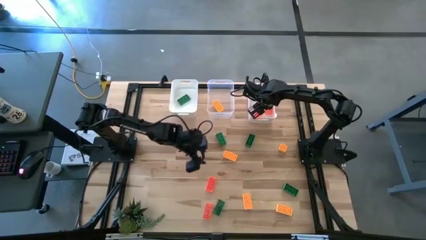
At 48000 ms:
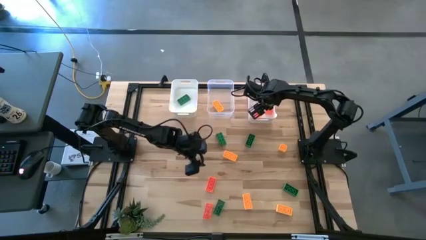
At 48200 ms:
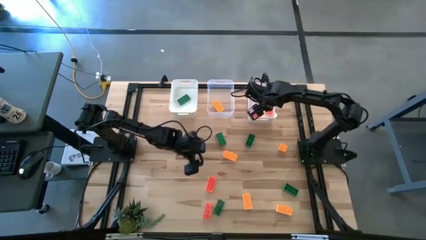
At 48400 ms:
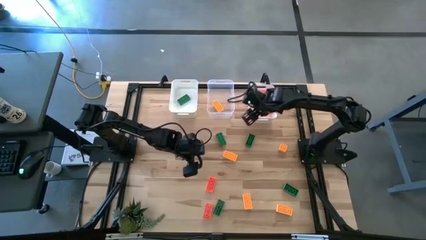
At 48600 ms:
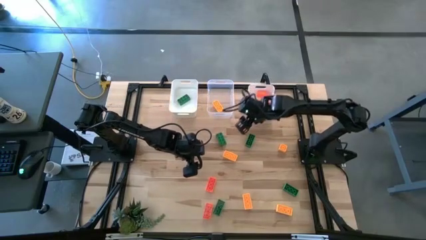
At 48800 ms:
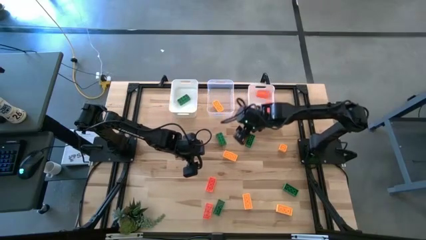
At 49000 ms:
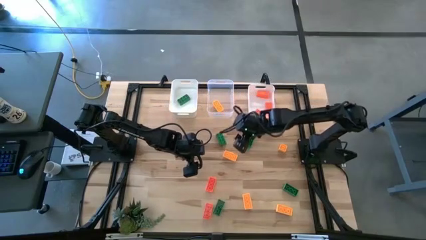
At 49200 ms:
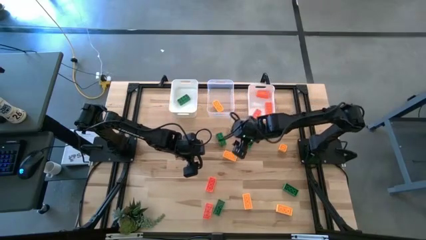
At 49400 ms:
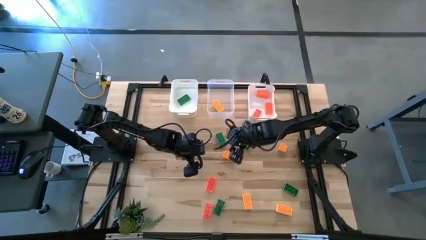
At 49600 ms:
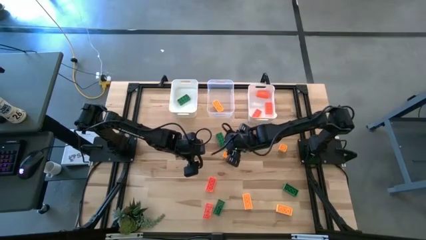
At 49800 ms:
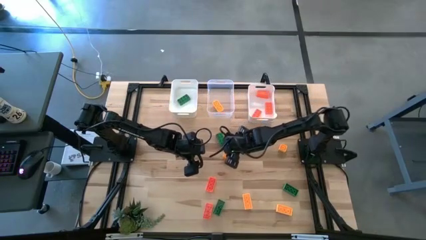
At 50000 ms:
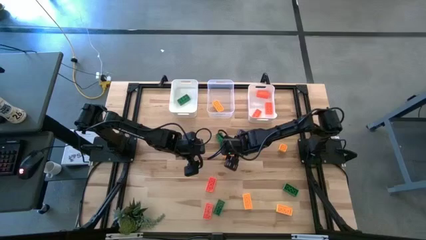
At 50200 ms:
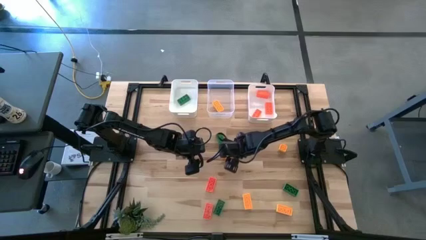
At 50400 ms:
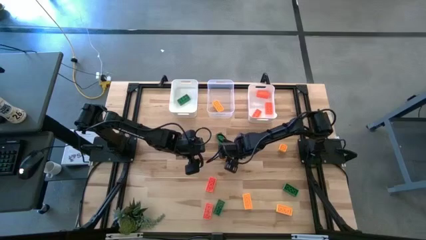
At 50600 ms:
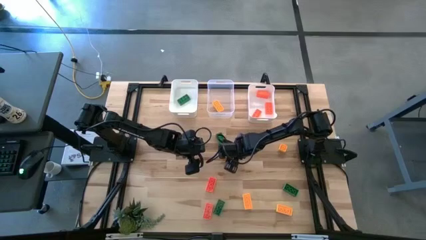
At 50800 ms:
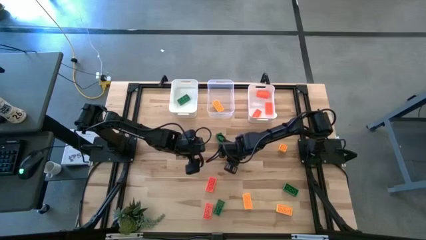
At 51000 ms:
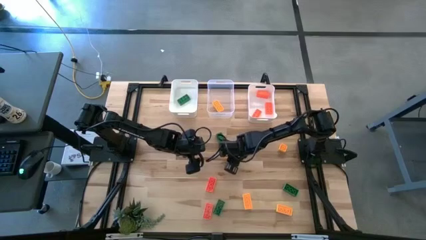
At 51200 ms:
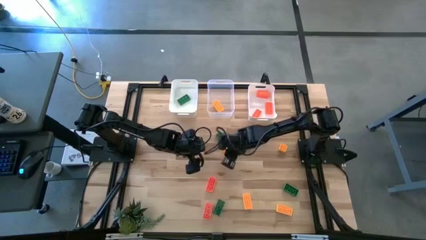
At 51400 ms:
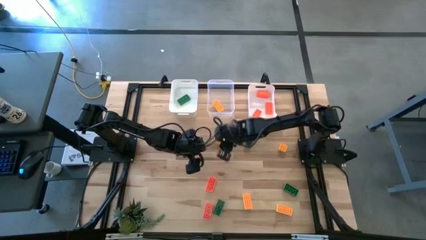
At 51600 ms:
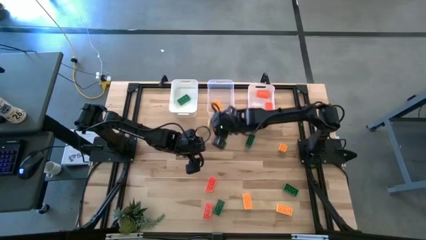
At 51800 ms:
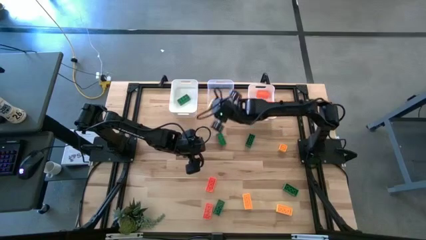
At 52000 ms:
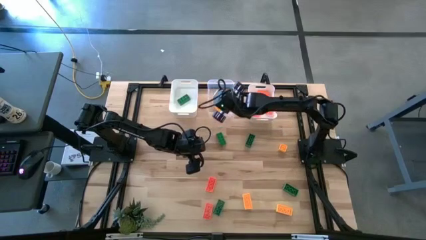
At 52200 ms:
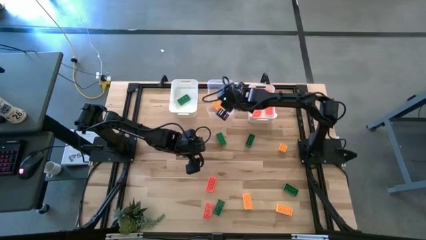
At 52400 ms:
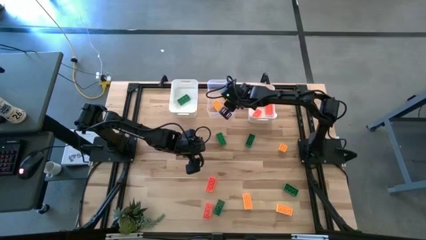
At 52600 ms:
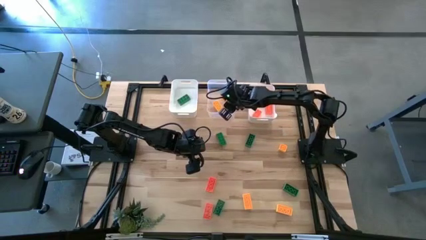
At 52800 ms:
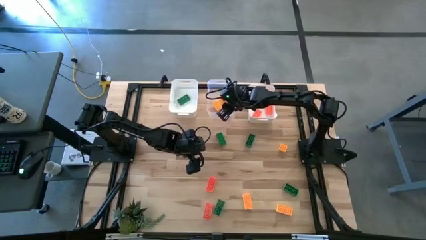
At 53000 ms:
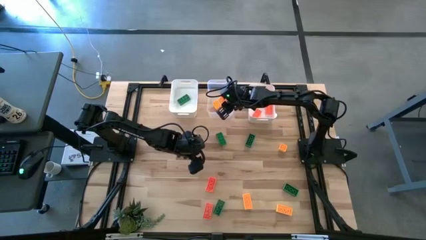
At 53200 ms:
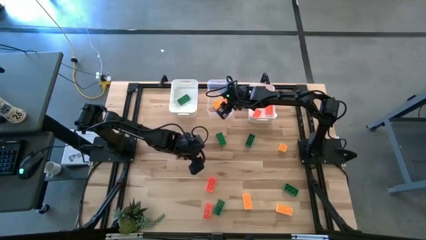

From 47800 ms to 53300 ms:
Task: Sort & place blocks by color
Put the yellow game piece into the transparent bin

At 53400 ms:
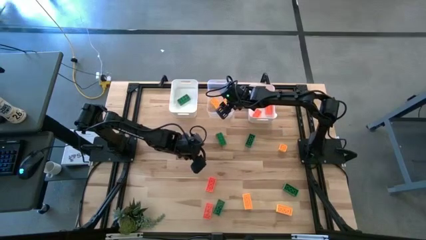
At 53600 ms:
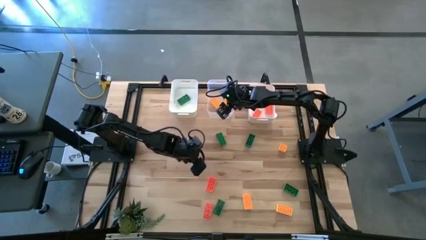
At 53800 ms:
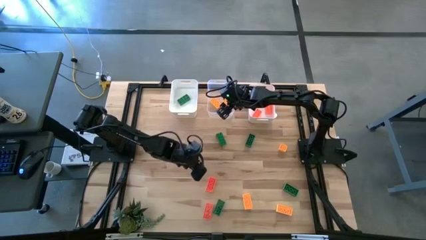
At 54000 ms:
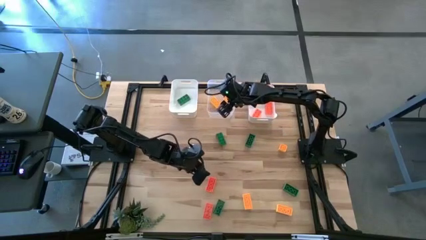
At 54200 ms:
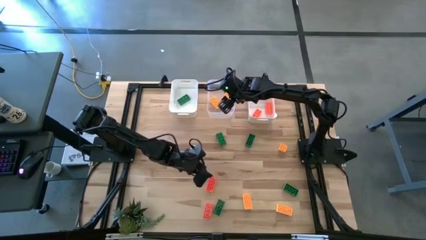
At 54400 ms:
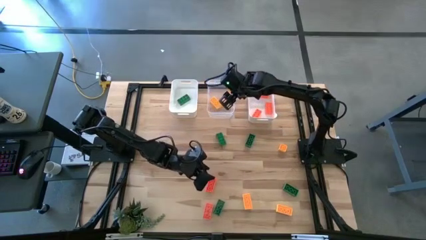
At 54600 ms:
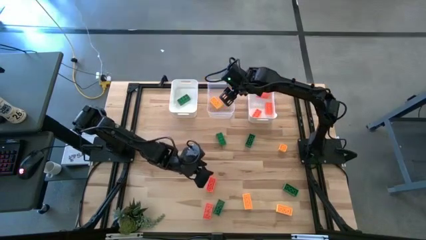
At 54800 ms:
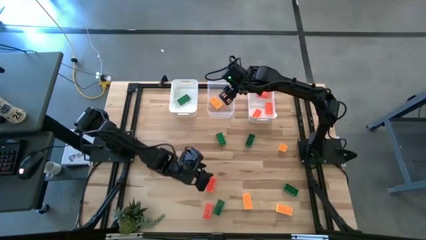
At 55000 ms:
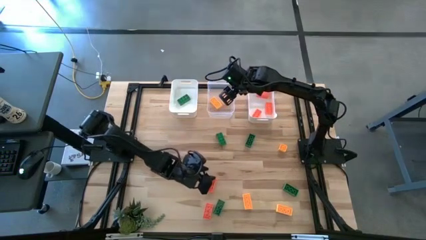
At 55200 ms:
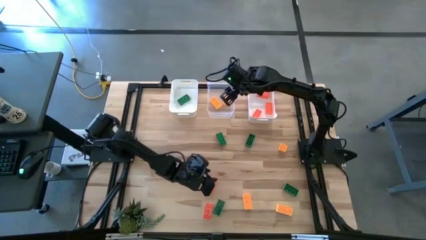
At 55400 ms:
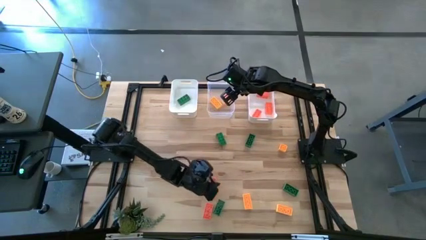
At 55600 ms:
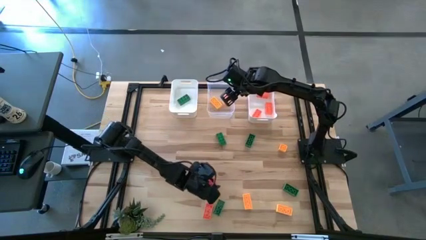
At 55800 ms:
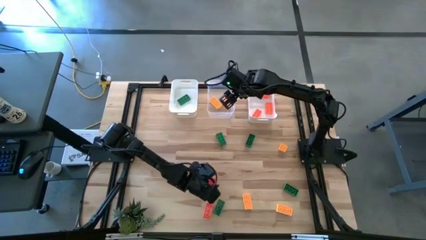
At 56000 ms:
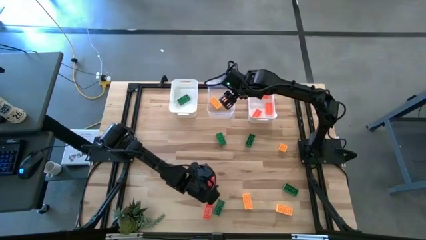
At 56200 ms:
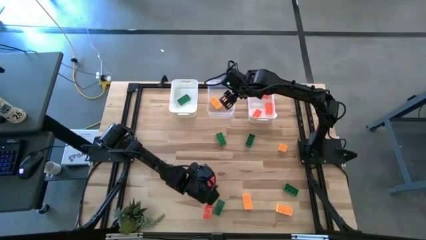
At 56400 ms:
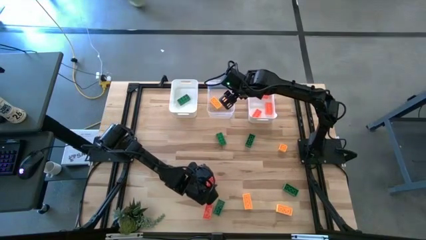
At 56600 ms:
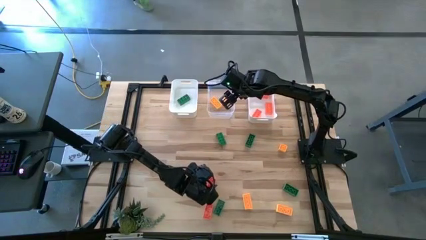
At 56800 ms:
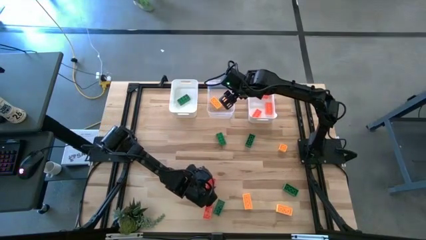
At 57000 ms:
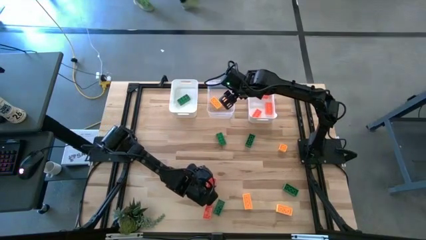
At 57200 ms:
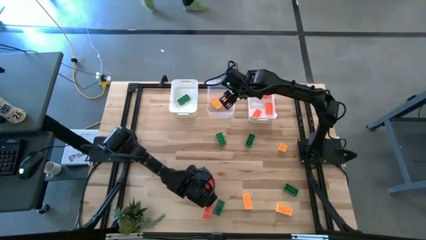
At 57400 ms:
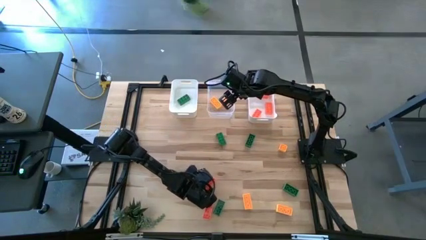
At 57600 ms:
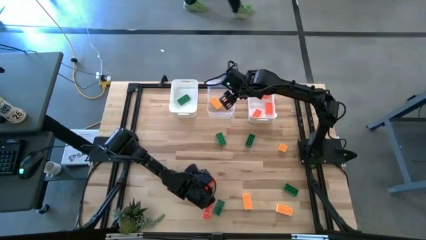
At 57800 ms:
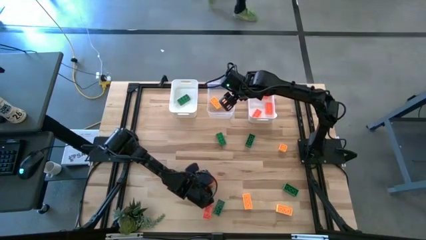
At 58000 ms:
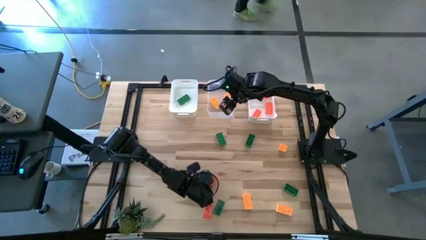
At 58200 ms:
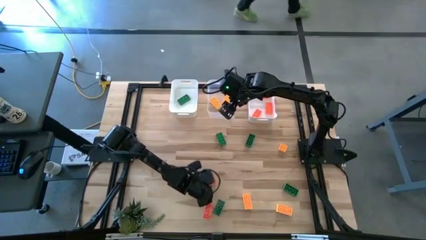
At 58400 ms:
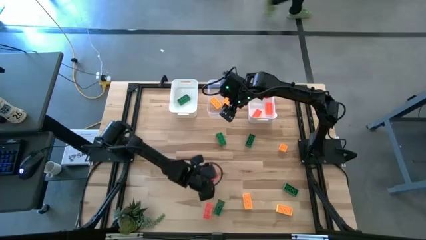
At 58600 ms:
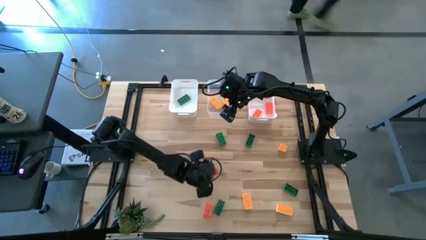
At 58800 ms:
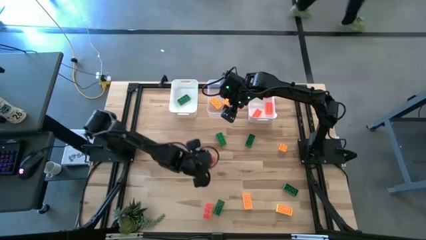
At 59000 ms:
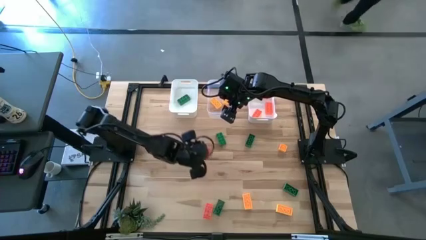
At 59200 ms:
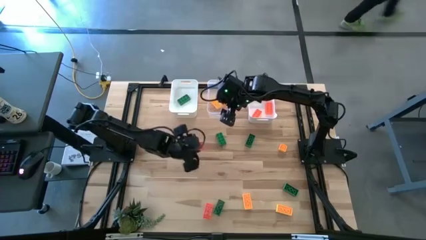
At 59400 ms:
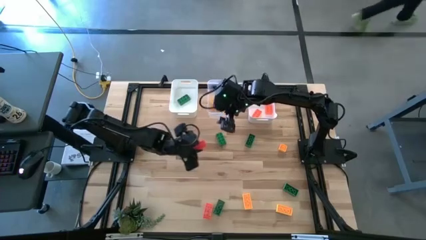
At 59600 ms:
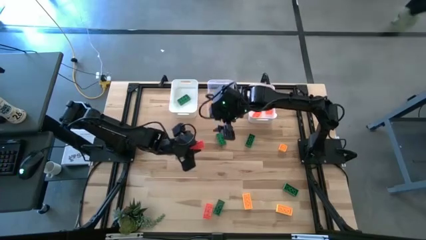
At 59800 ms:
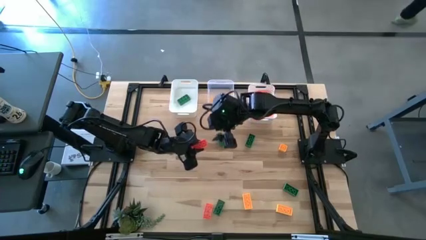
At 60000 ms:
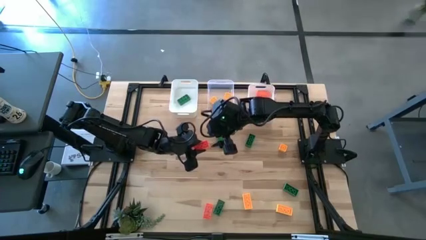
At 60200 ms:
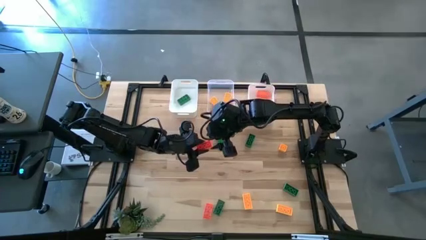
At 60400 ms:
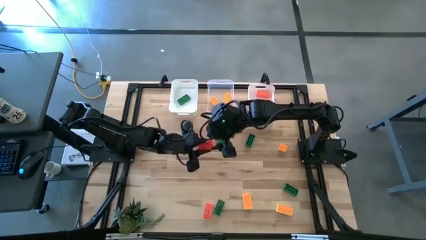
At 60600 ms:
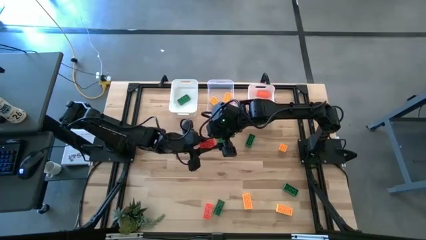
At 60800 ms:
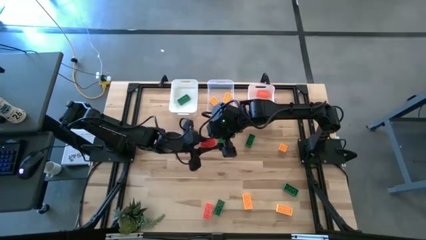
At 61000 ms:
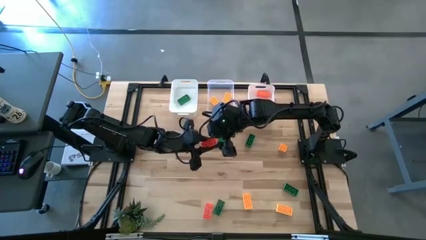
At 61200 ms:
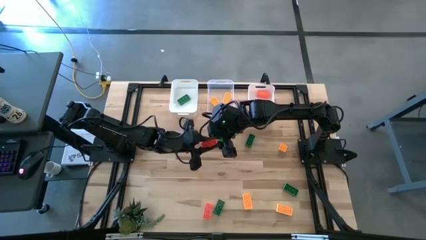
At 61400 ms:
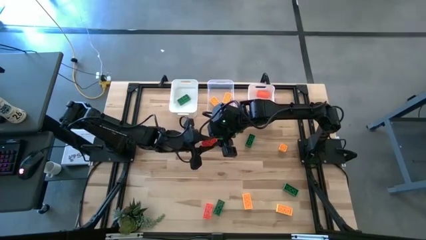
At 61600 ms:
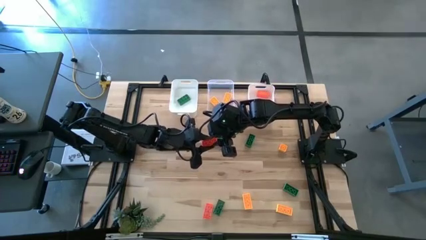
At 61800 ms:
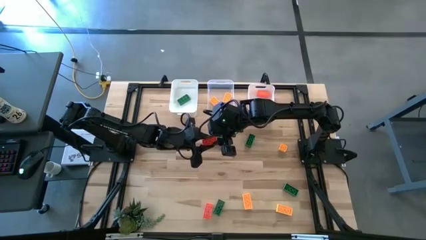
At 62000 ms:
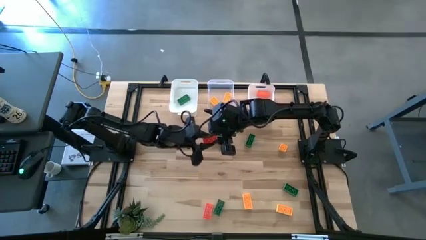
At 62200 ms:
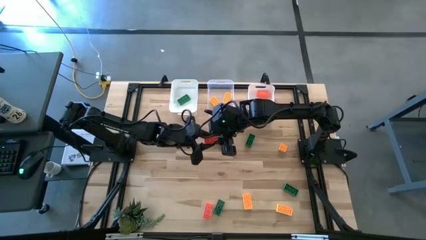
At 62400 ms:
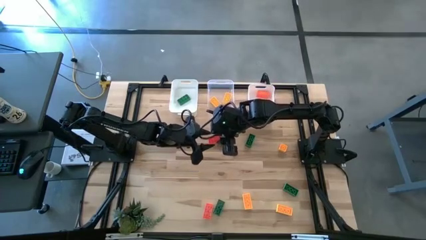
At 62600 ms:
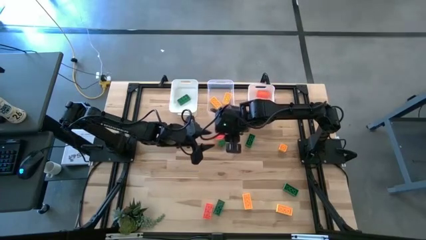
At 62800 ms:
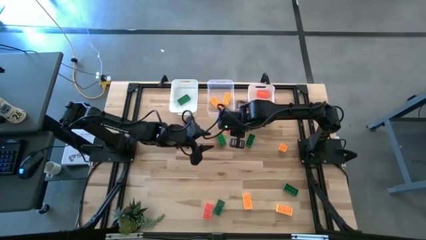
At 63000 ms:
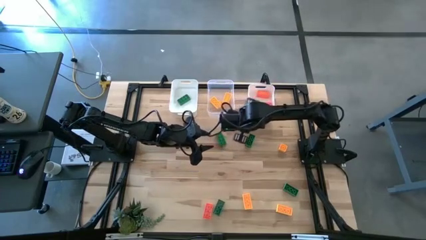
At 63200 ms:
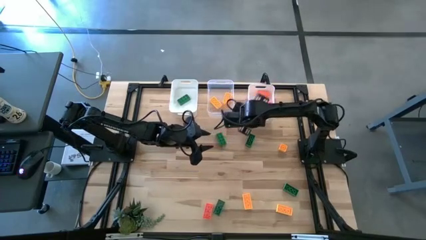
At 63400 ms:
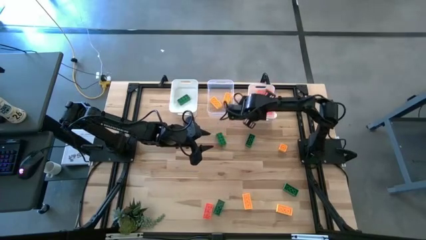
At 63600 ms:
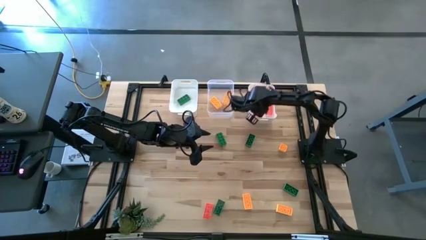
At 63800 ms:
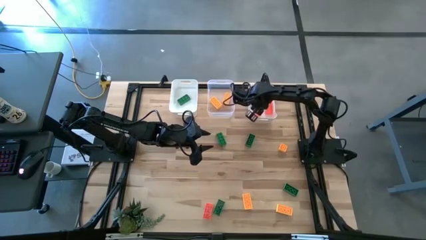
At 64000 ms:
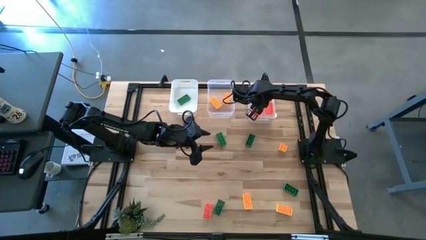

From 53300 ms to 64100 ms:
Put the orange game piece into the right white bin
